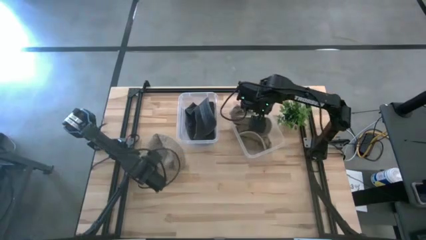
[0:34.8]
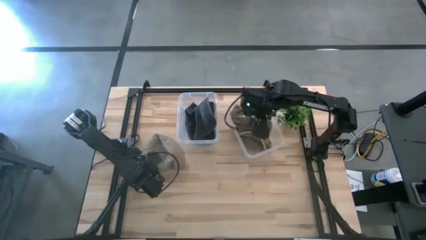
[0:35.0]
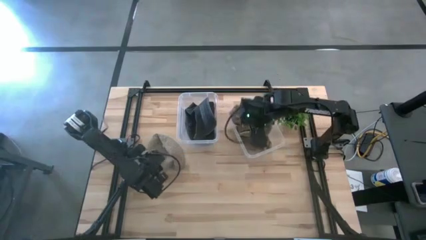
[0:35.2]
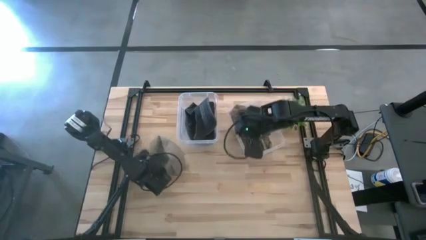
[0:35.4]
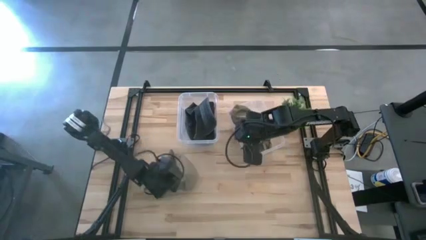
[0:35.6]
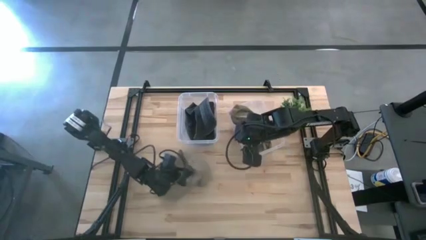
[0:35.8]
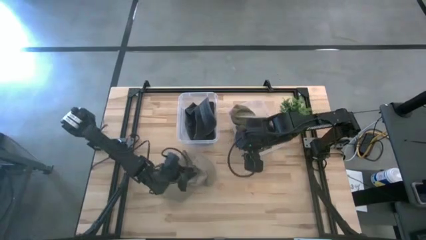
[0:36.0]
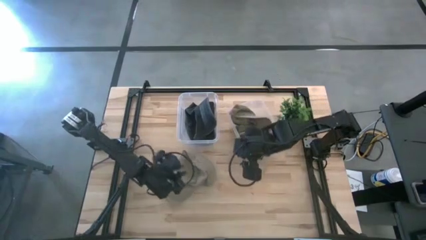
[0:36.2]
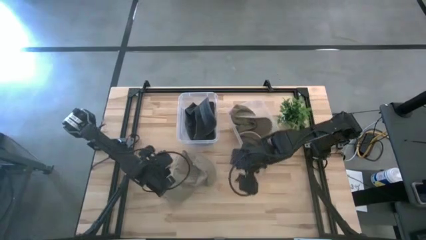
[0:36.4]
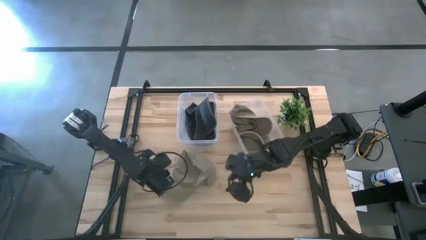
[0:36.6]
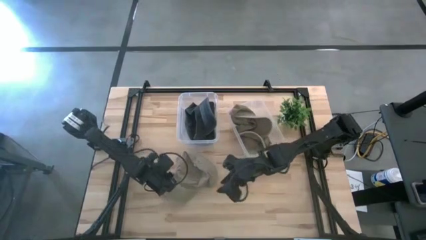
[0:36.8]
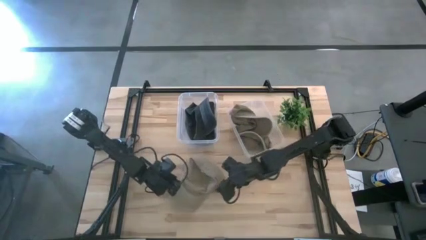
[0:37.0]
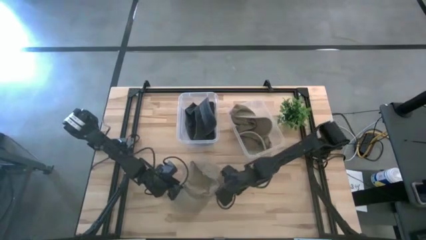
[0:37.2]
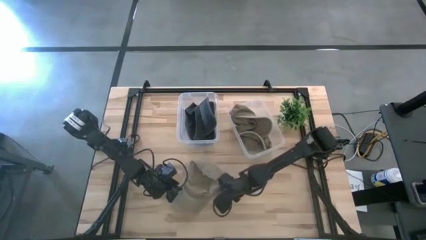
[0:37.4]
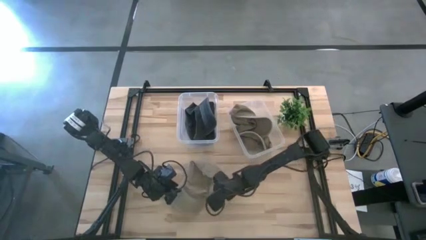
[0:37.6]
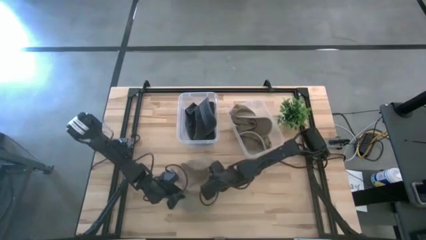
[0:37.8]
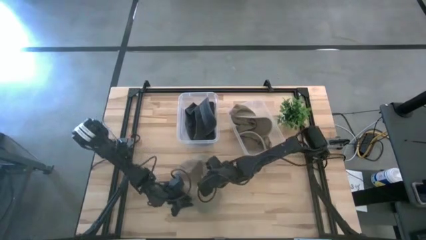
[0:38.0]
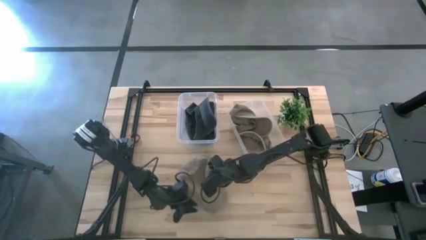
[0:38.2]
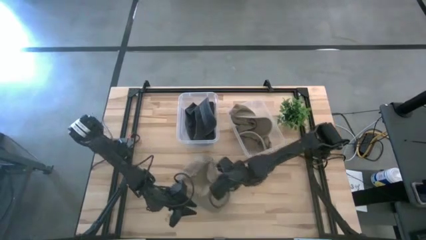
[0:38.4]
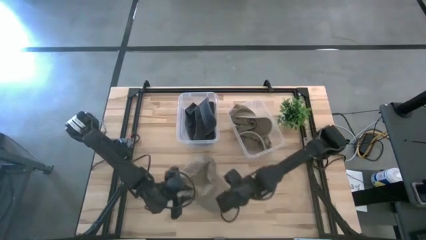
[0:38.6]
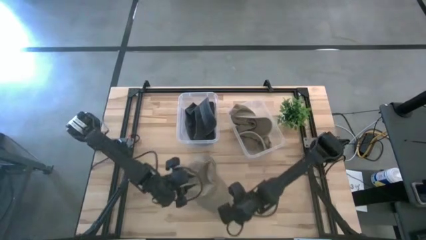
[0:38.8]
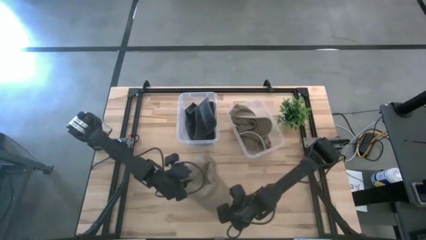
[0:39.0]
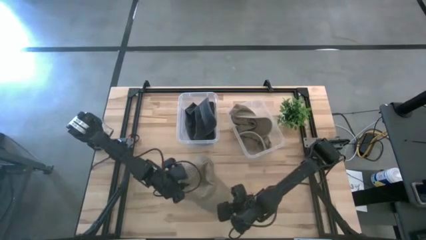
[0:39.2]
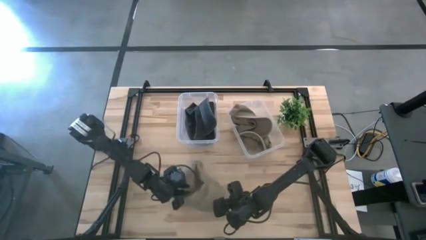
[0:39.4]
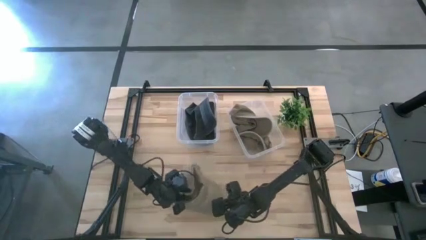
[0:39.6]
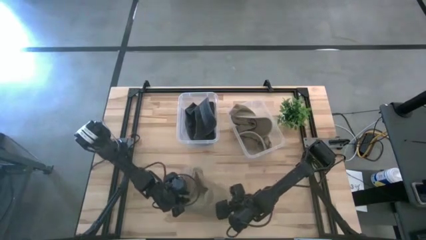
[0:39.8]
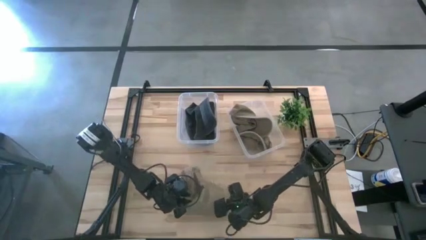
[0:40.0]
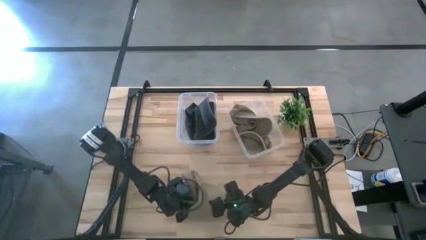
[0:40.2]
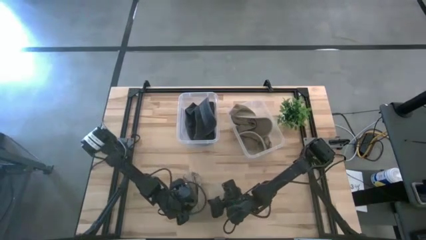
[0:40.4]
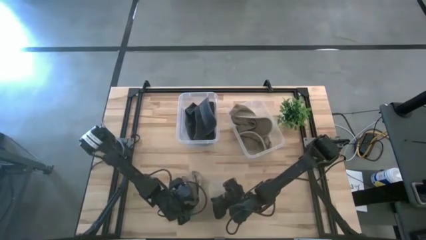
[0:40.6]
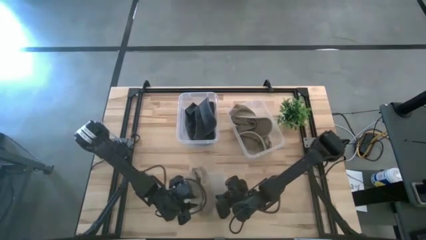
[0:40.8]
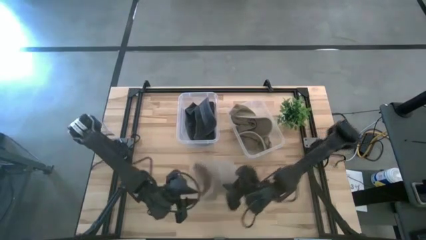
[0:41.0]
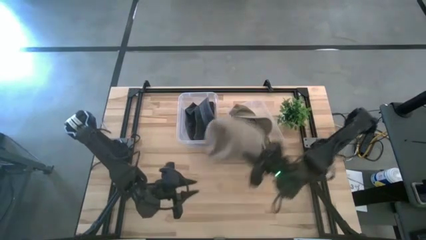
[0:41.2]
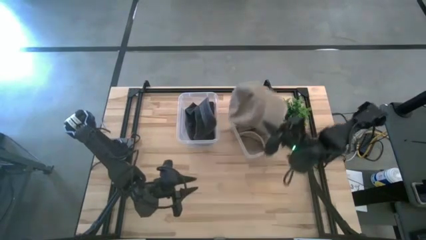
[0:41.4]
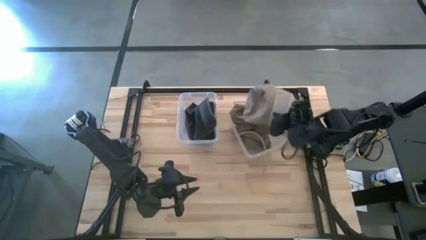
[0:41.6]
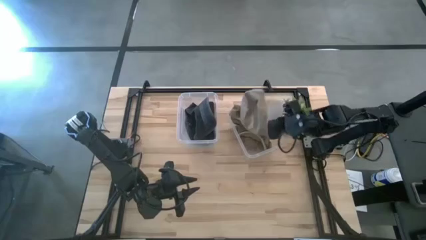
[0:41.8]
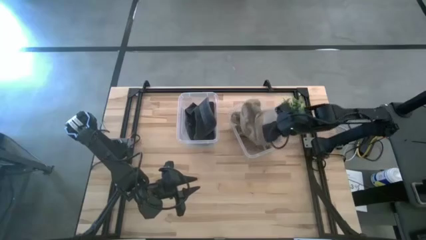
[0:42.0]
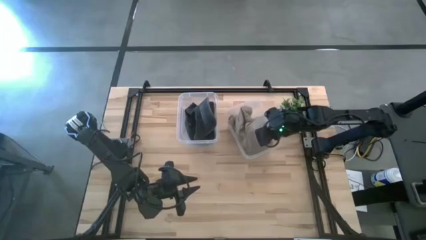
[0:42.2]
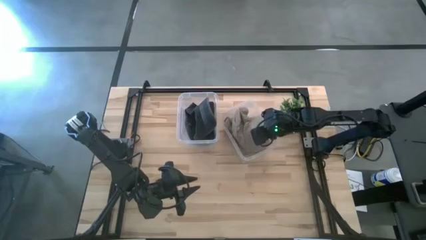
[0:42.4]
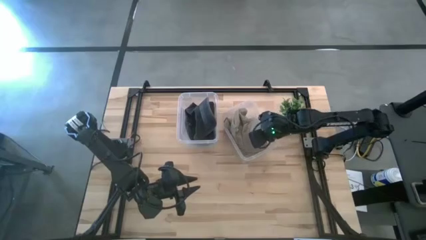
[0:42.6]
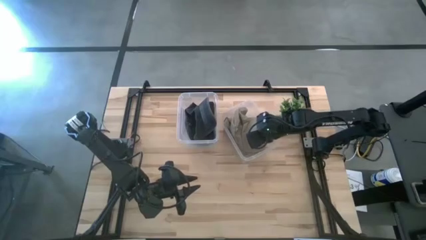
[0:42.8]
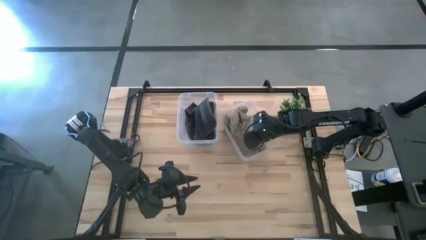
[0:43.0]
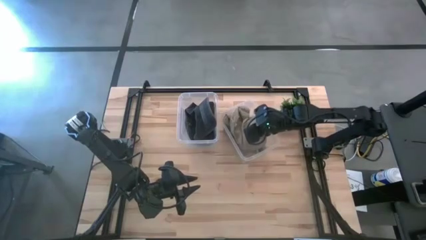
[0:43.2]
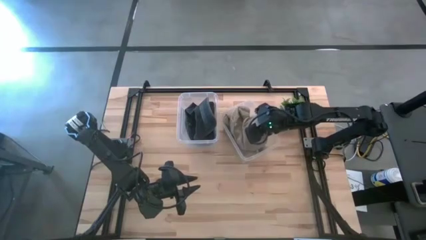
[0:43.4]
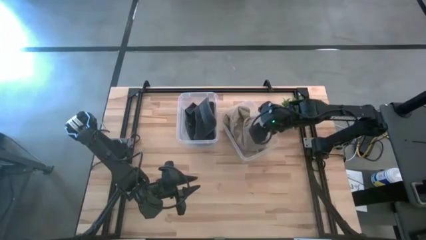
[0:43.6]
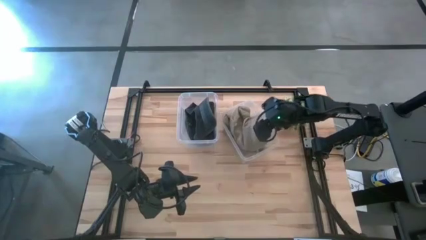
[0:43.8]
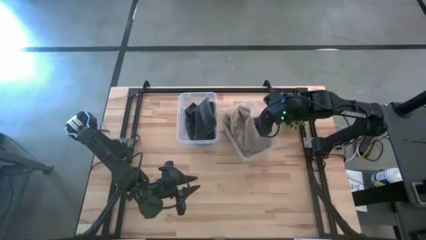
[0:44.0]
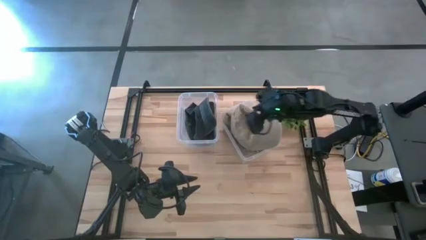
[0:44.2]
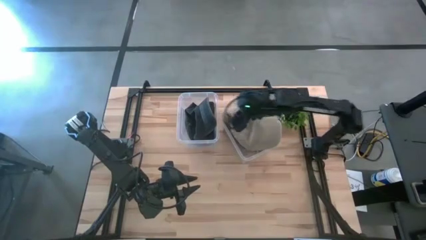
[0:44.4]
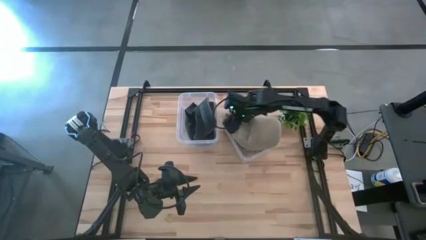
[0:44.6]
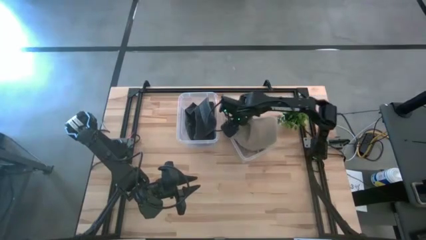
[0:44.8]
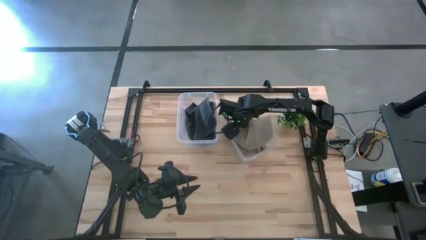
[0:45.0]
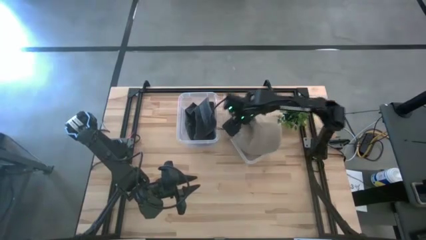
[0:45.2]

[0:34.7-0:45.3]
Task: Pick & Place hat
Put the brown hat into the right transparent bin

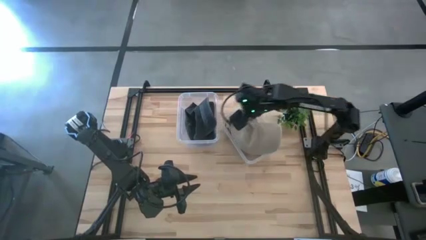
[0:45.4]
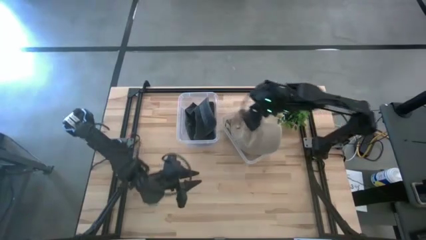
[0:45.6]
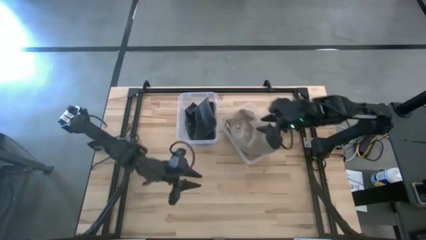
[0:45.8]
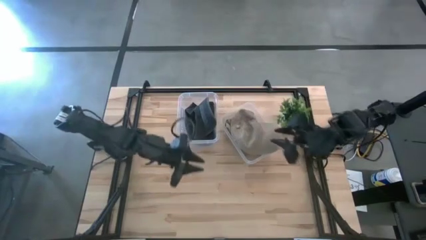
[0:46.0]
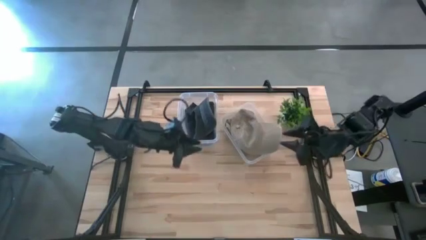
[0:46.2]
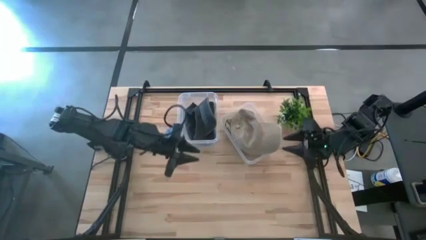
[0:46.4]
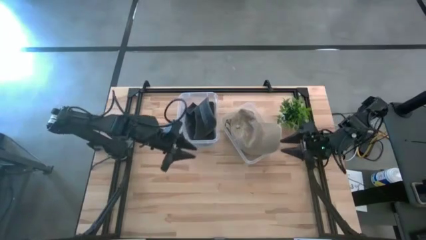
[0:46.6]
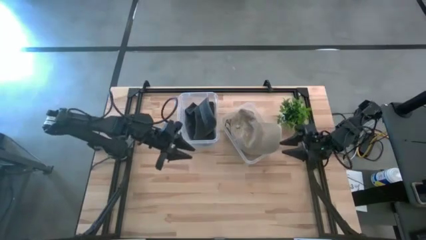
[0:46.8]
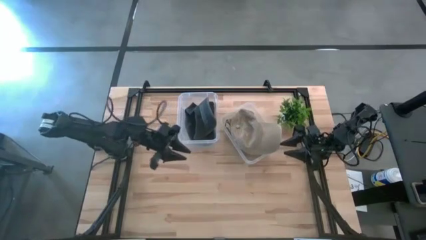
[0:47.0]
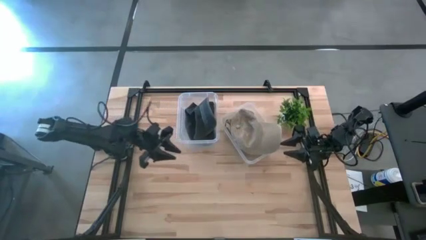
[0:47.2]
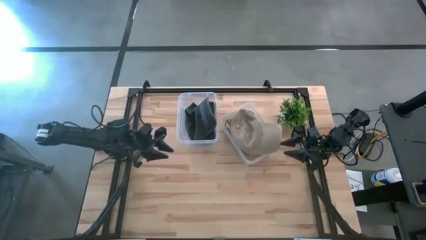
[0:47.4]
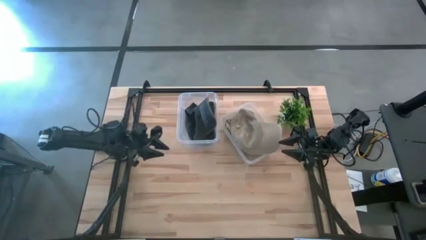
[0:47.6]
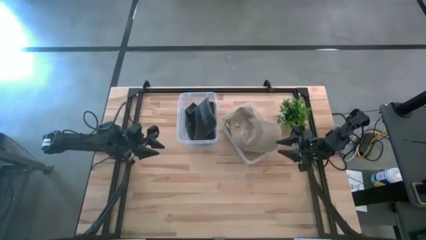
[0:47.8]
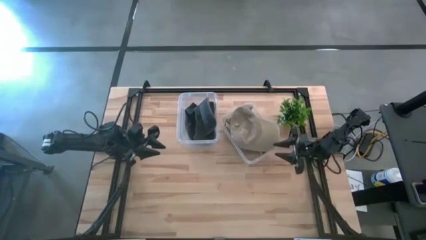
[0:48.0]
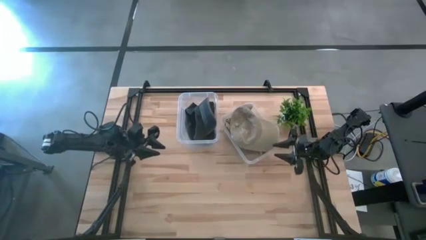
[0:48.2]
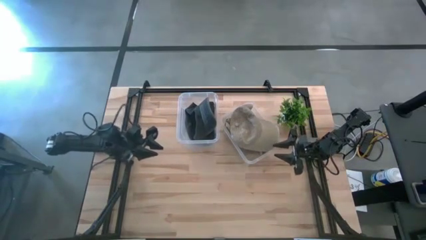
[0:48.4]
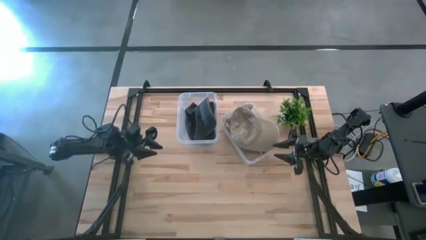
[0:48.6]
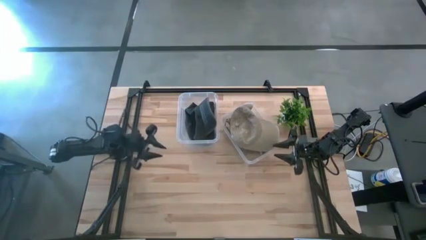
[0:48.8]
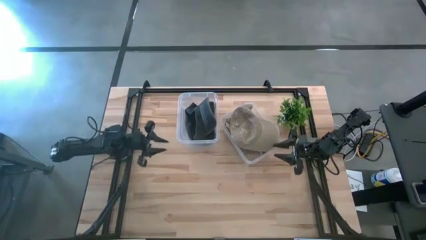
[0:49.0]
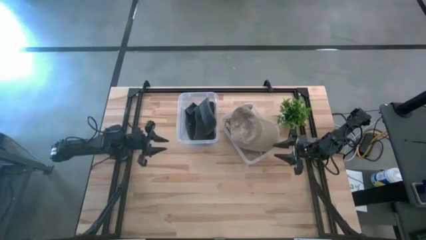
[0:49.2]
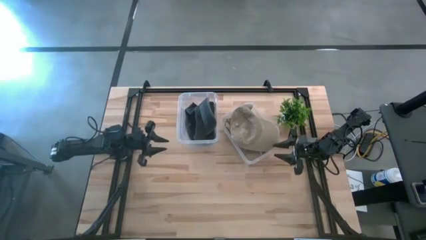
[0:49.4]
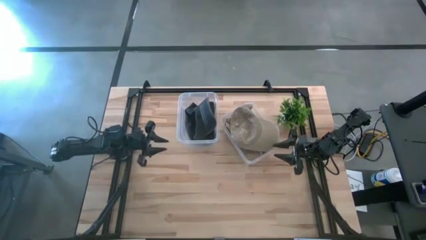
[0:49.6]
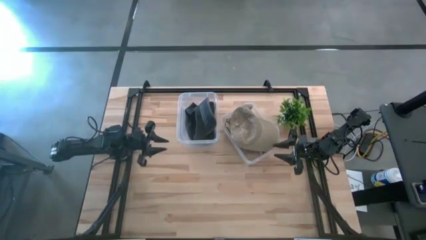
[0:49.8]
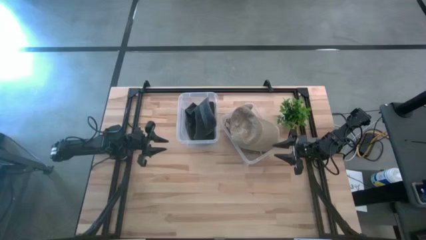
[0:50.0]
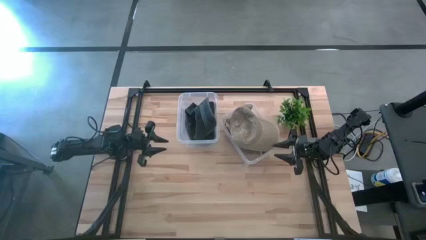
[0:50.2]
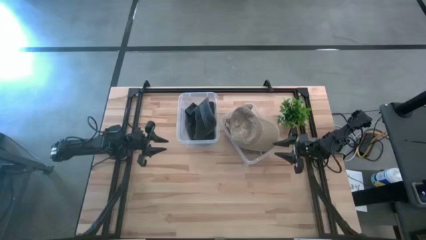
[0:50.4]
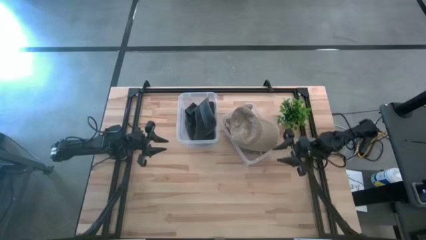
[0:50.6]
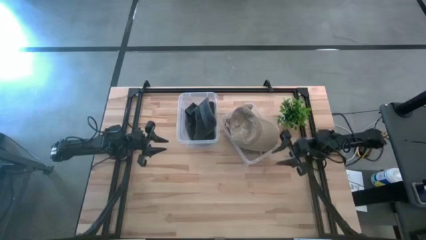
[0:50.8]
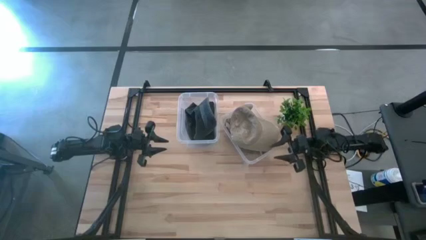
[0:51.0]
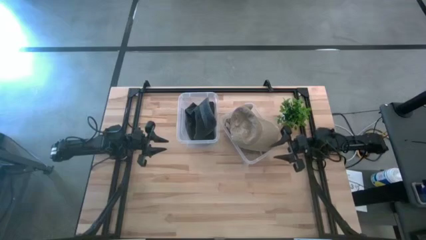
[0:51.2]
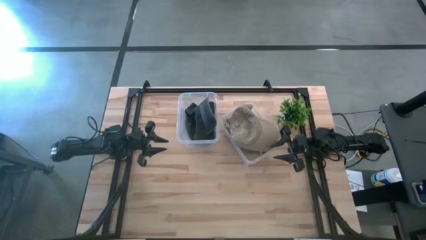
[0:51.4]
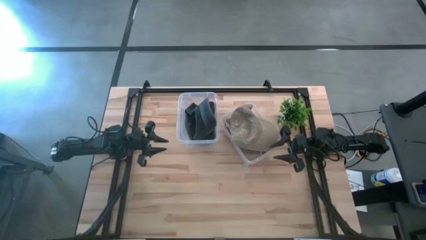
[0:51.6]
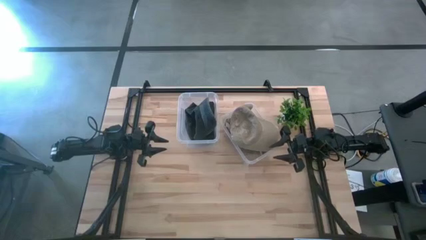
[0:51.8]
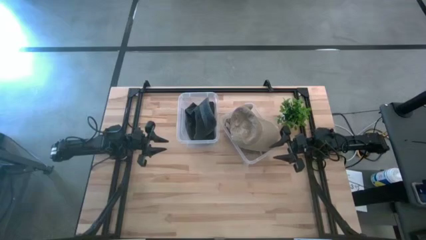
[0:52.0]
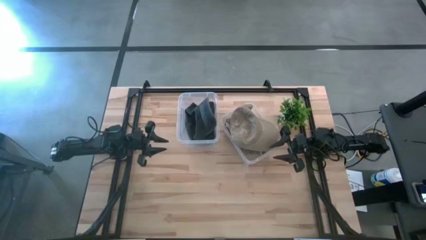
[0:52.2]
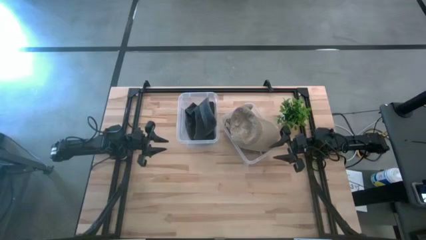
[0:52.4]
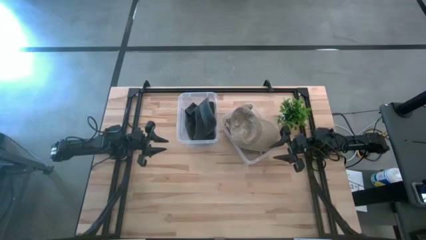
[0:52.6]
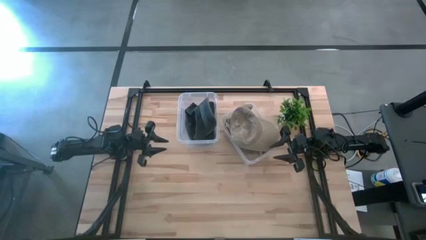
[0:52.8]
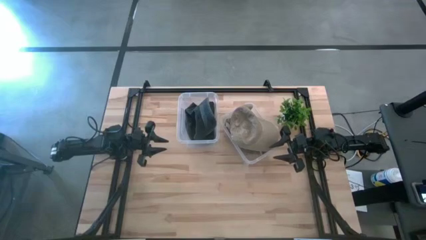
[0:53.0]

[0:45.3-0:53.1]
Return to Home Position
